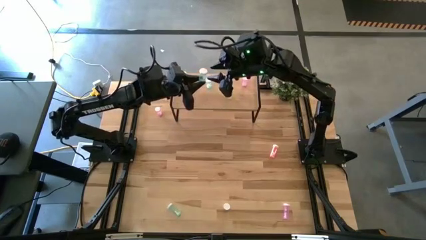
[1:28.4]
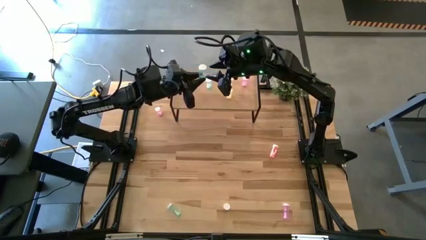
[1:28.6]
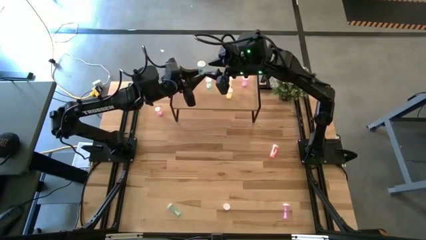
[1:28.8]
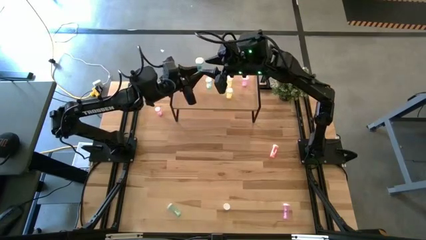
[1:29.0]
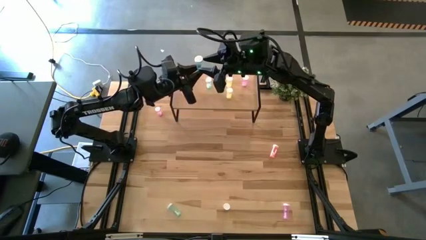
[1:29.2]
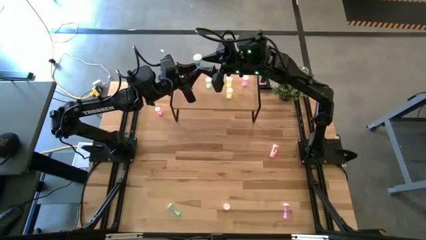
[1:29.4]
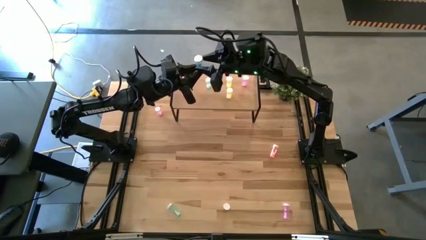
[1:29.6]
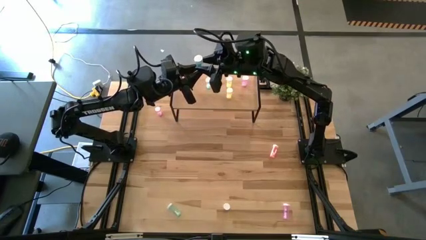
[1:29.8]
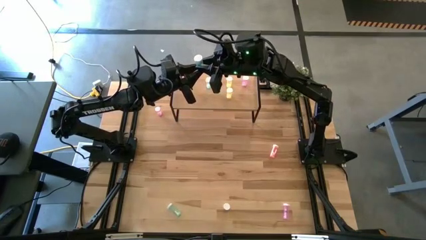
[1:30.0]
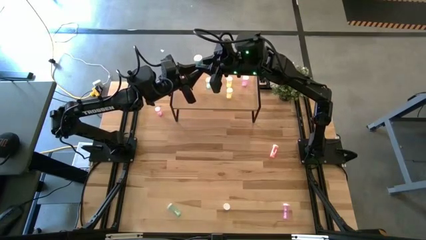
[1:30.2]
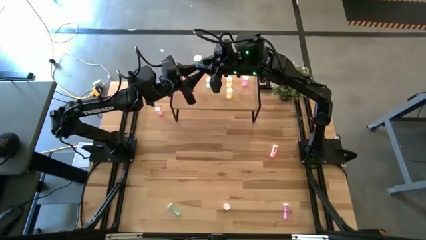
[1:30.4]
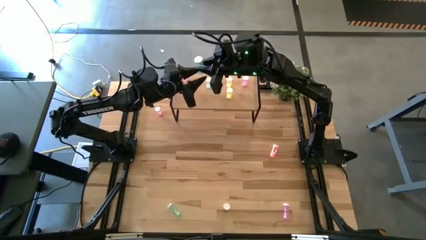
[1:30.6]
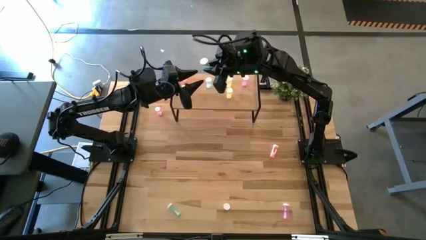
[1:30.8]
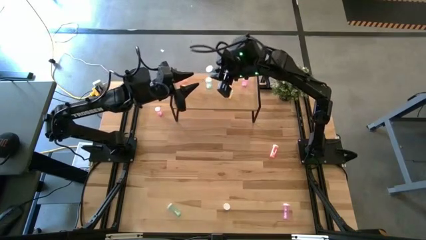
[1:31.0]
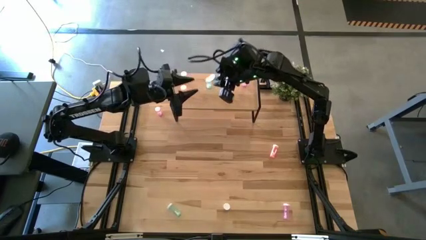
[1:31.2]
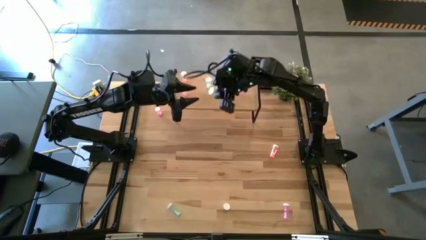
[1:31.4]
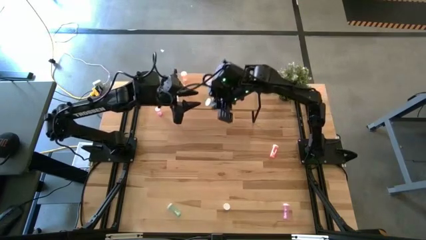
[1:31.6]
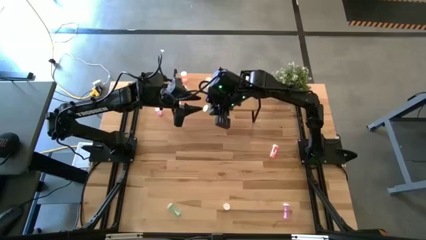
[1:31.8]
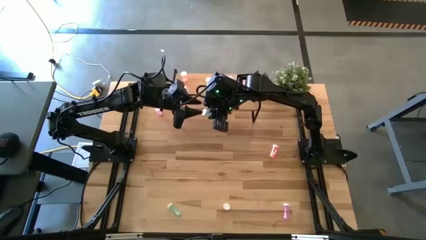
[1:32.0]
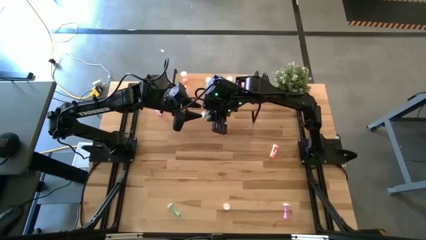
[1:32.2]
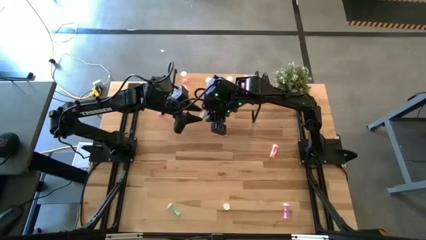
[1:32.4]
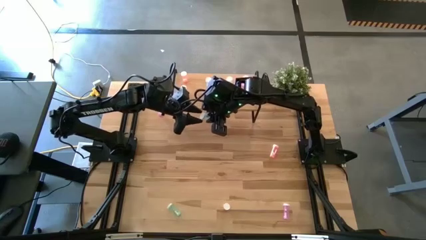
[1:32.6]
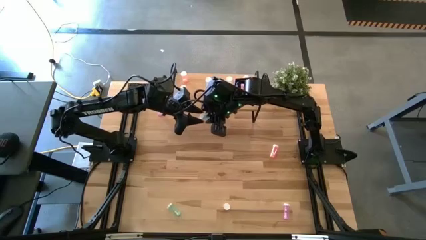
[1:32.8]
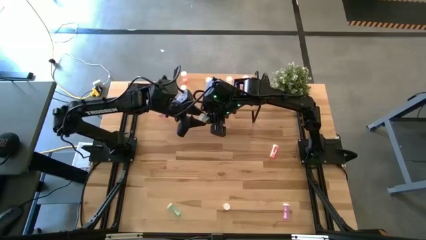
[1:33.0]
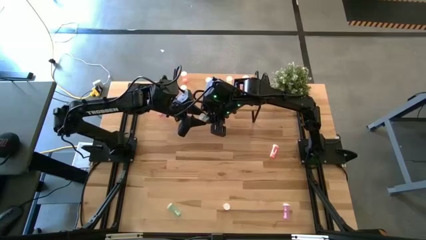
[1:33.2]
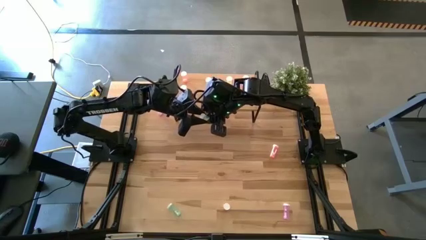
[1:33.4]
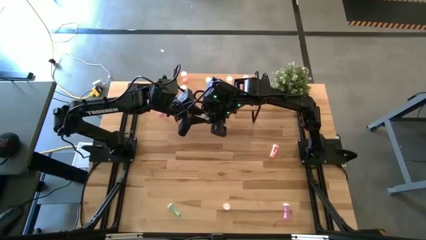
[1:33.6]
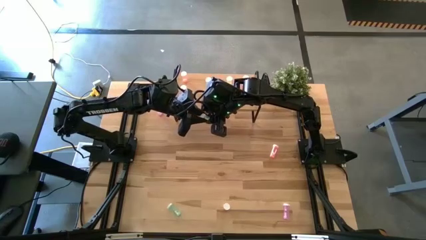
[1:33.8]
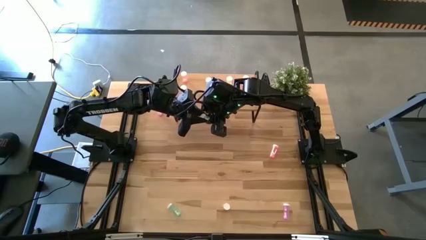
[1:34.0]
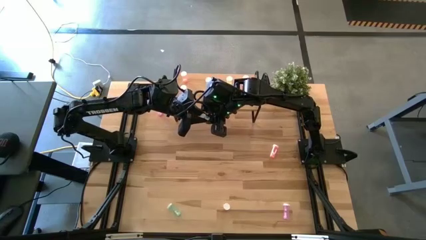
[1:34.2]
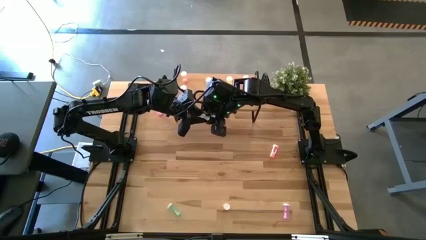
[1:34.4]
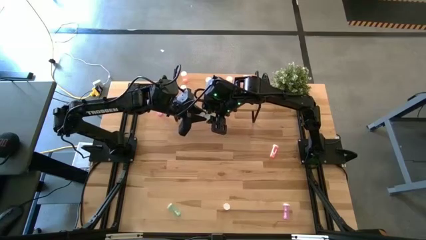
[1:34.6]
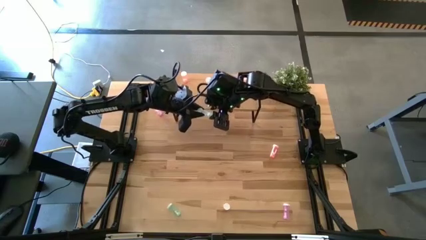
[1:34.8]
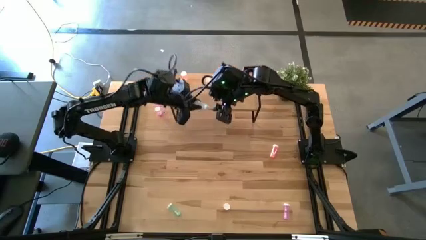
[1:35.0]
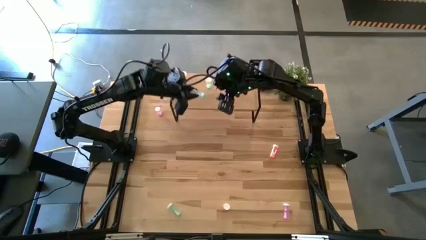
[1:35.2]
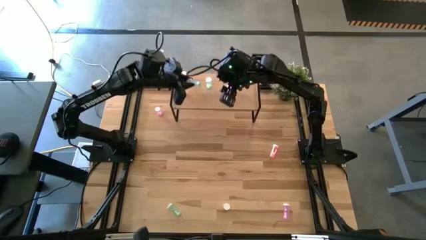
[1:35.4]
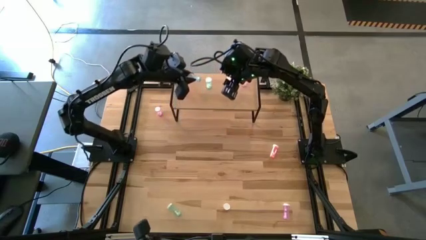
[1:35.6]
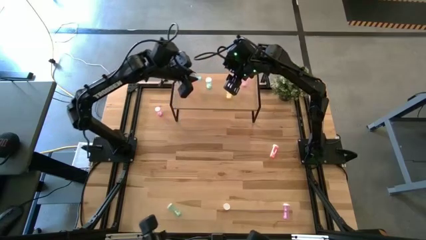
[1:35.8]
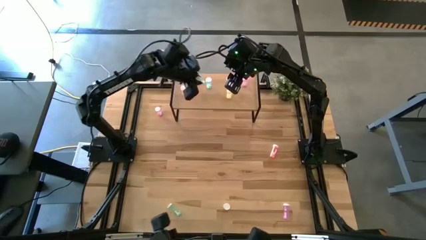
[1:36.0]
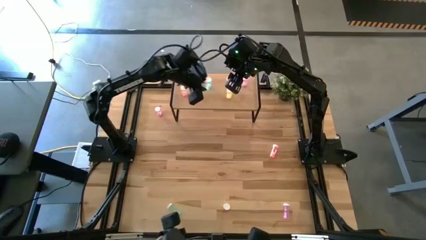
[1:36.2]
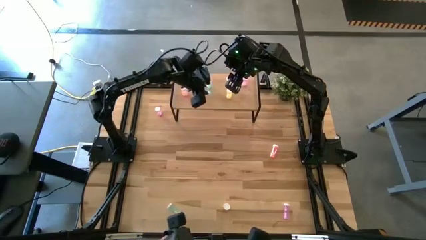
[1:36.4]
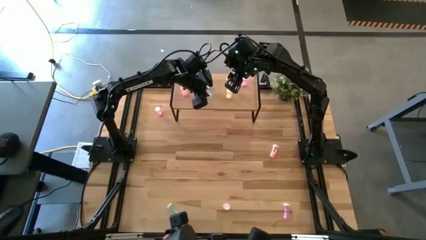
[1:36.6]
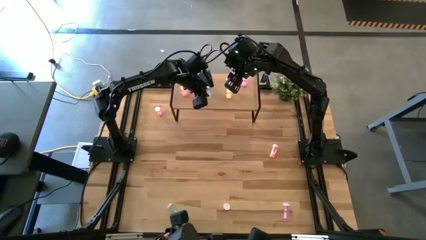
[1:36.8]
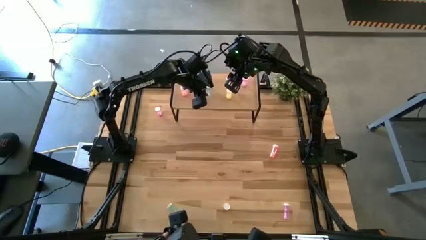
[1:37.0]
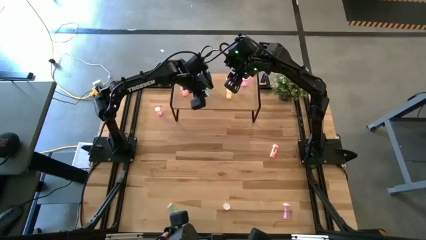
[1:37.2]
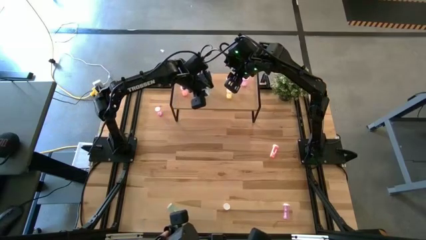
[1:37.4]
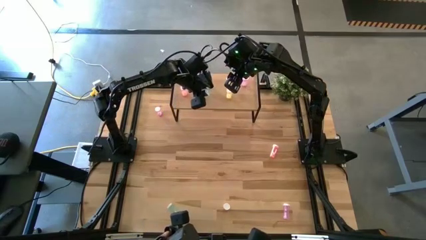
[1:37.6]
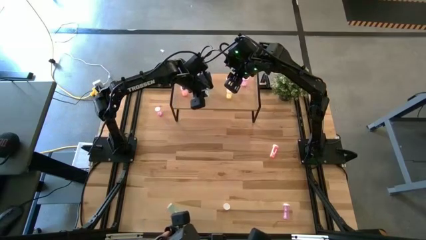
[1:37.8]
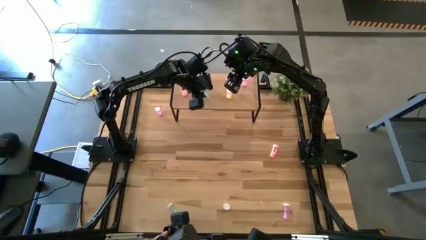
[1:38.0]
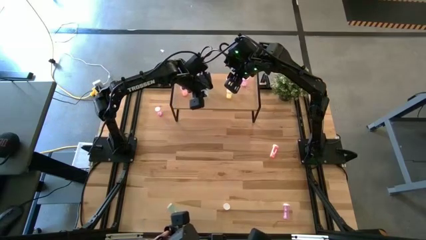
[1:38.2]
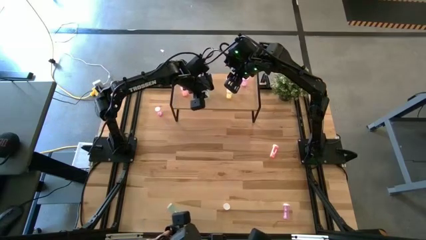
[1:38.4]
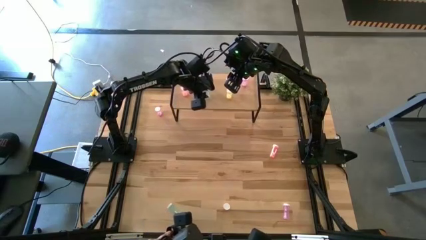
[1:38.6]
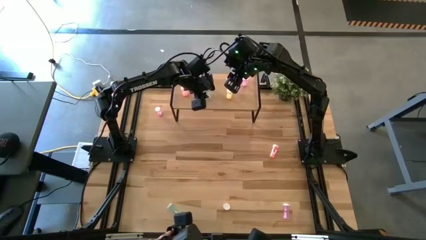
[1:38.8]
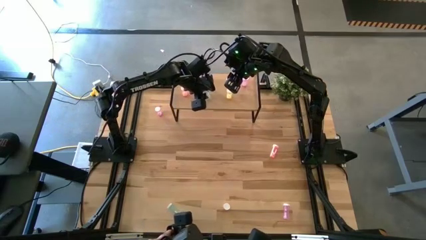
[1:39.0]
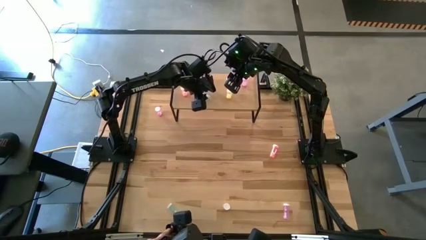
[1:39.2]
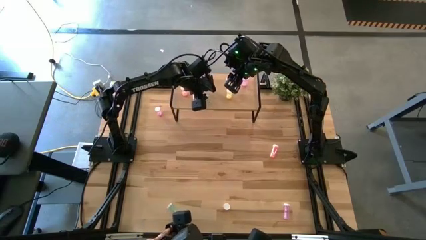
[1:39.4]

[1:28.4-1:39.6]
Task: Pick and place medicine bottles onto shelf by color
Put the right blue pill bottle on the shelf aligned with the other blue pill bottle
